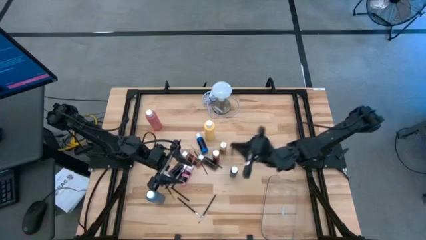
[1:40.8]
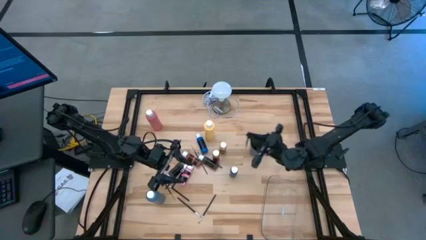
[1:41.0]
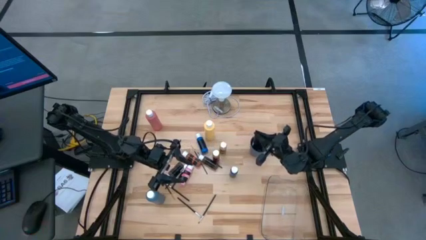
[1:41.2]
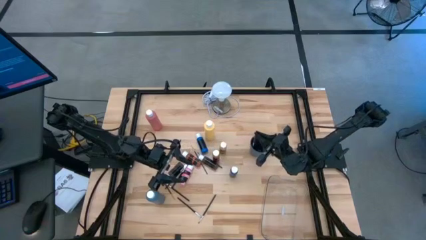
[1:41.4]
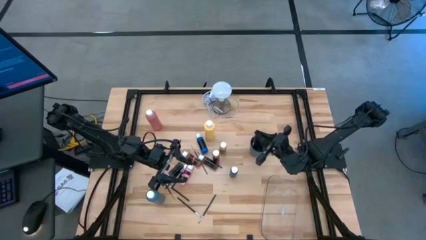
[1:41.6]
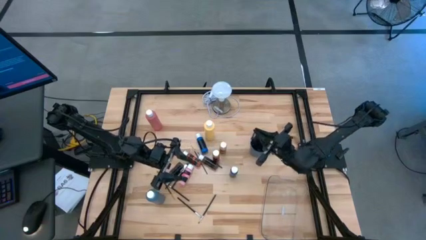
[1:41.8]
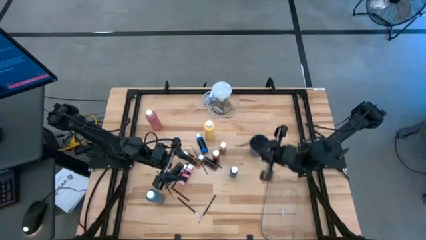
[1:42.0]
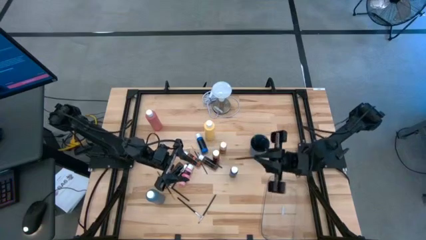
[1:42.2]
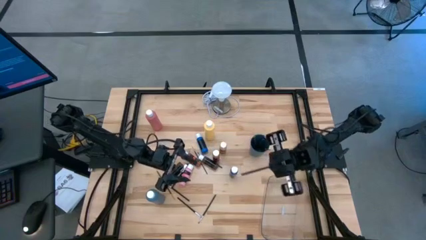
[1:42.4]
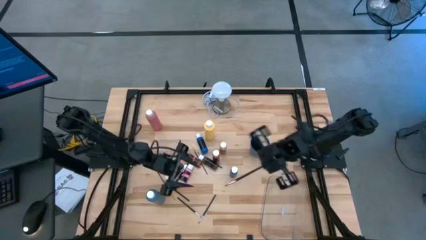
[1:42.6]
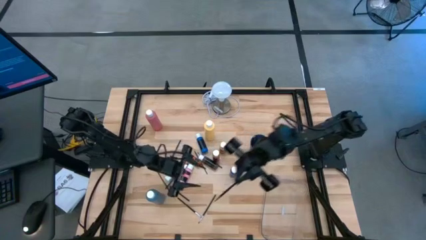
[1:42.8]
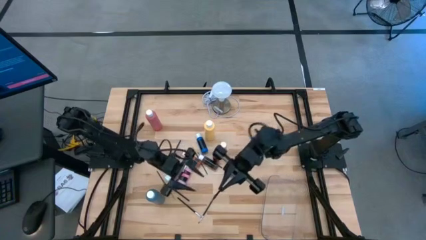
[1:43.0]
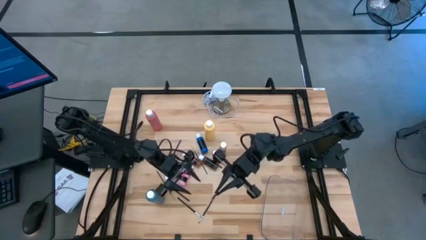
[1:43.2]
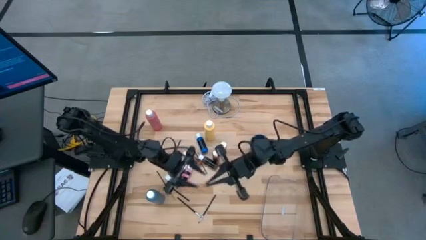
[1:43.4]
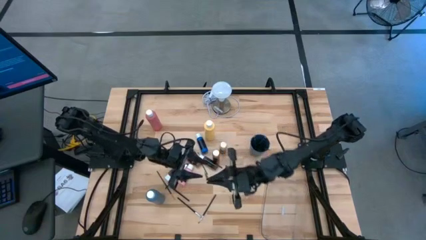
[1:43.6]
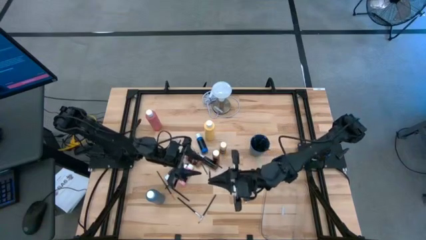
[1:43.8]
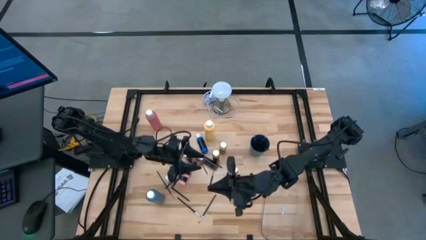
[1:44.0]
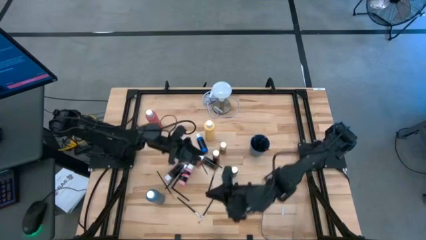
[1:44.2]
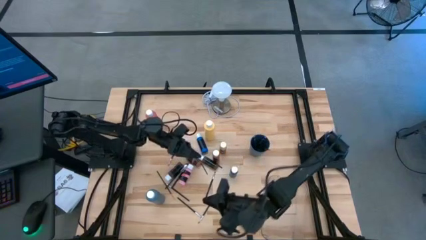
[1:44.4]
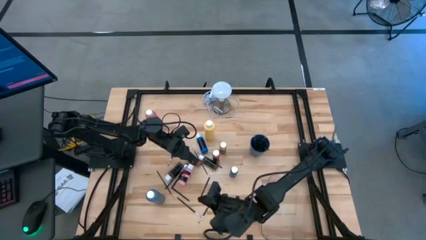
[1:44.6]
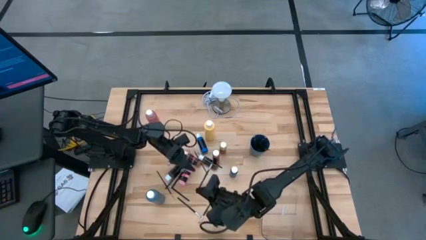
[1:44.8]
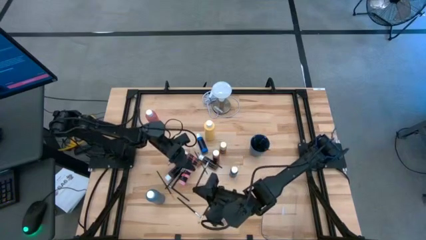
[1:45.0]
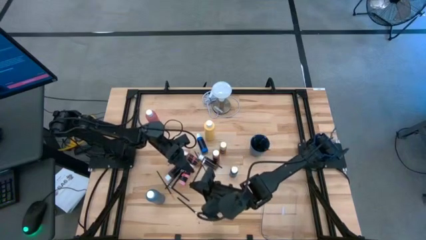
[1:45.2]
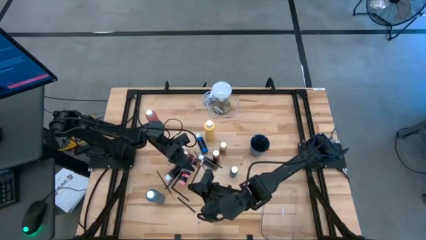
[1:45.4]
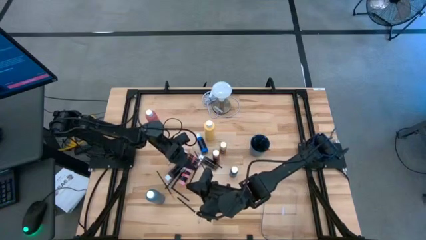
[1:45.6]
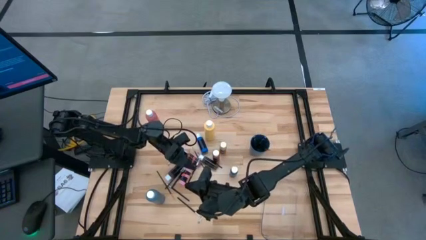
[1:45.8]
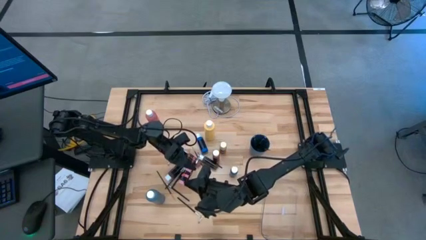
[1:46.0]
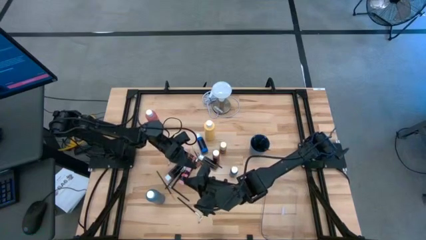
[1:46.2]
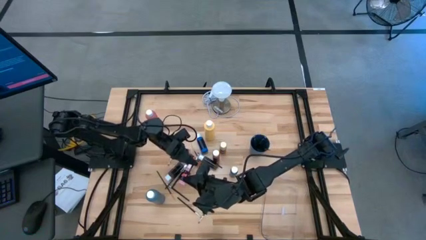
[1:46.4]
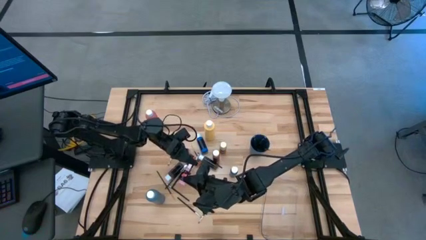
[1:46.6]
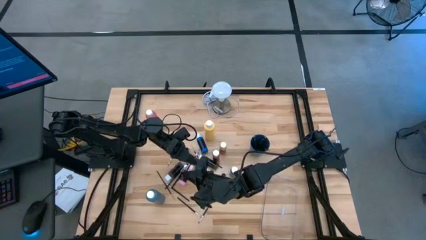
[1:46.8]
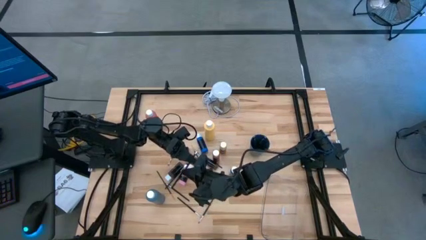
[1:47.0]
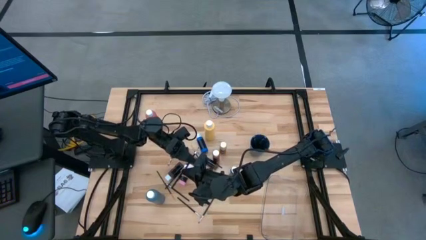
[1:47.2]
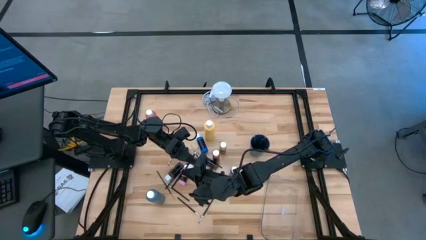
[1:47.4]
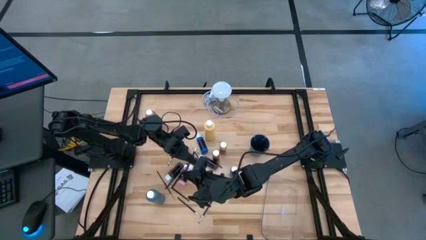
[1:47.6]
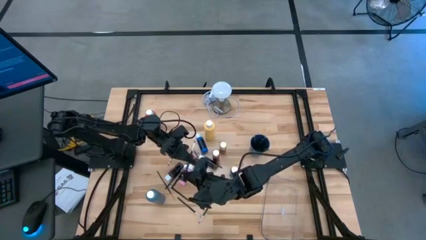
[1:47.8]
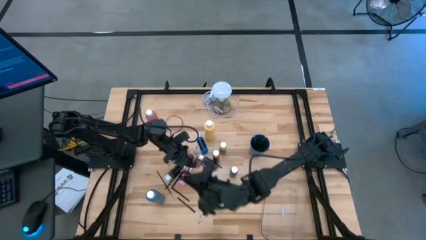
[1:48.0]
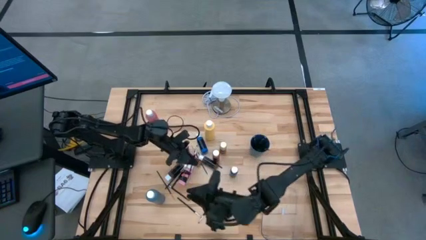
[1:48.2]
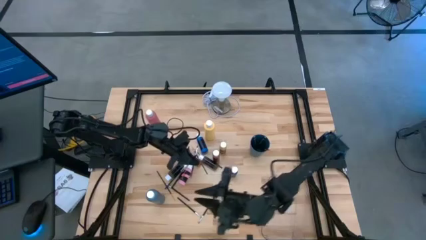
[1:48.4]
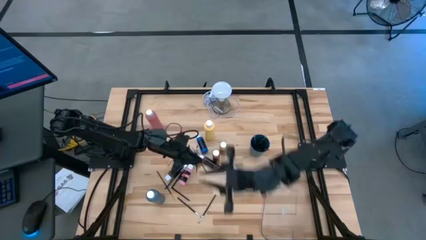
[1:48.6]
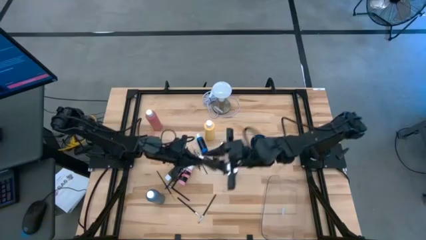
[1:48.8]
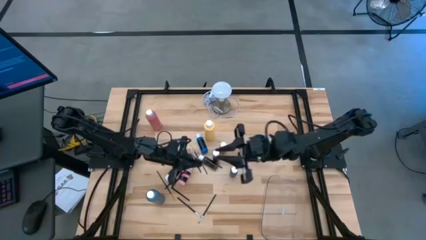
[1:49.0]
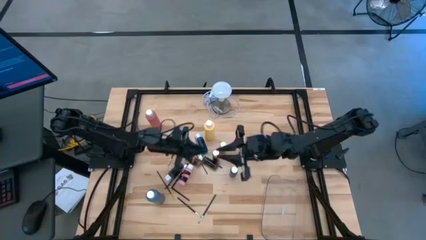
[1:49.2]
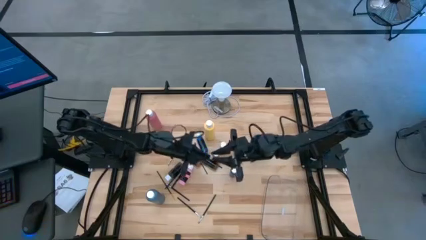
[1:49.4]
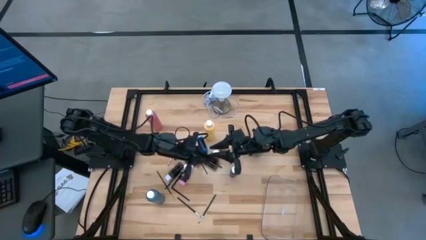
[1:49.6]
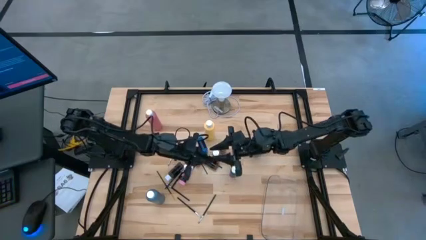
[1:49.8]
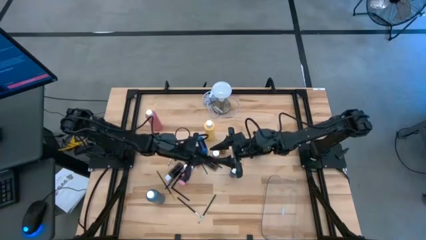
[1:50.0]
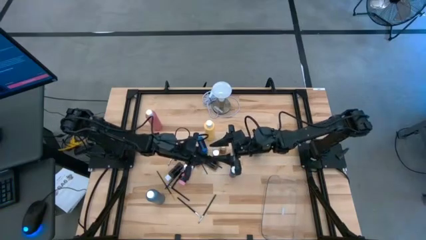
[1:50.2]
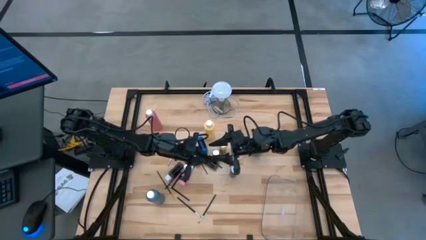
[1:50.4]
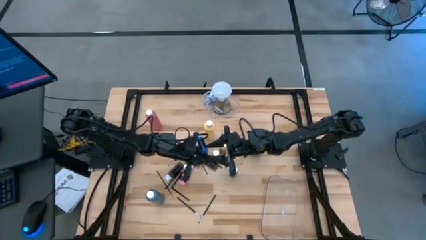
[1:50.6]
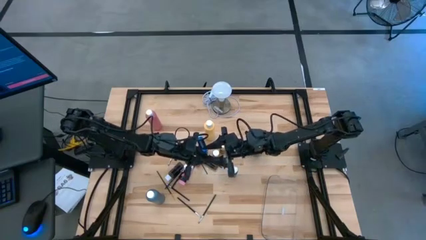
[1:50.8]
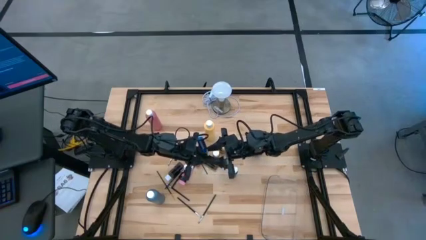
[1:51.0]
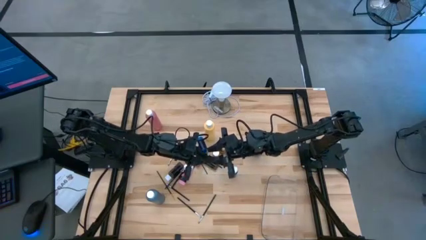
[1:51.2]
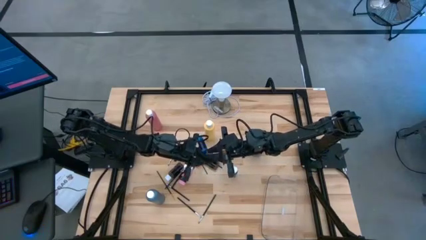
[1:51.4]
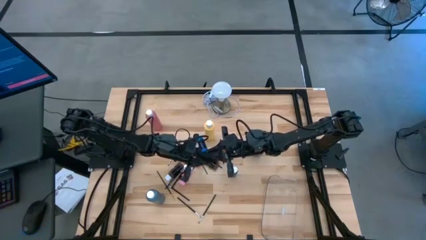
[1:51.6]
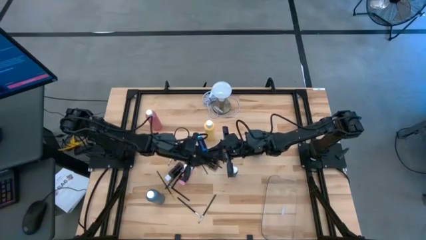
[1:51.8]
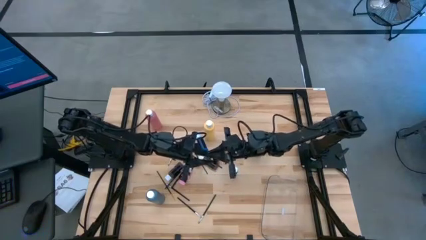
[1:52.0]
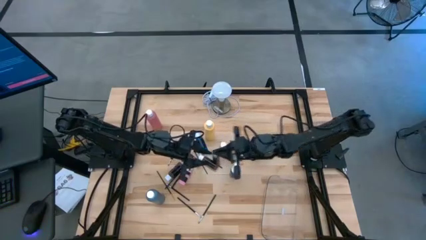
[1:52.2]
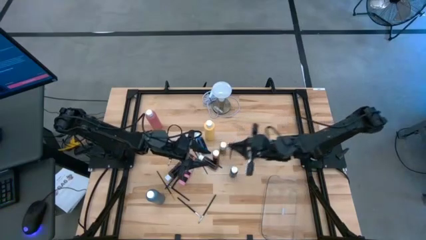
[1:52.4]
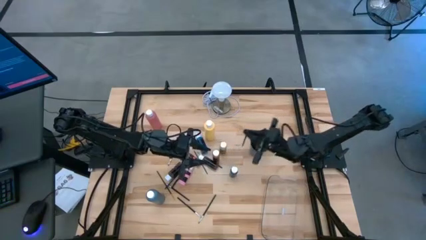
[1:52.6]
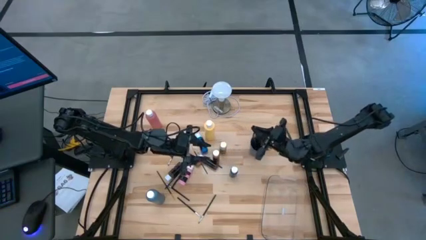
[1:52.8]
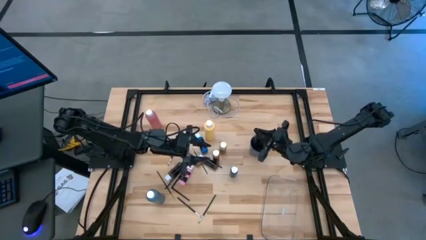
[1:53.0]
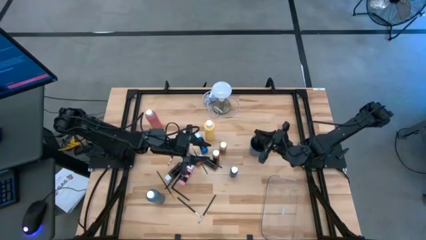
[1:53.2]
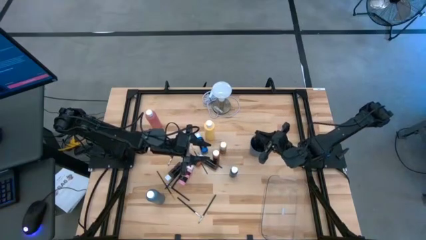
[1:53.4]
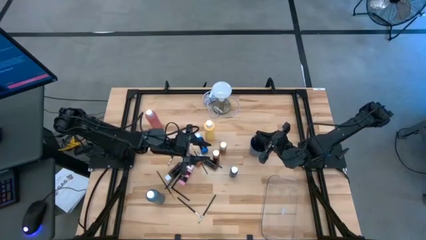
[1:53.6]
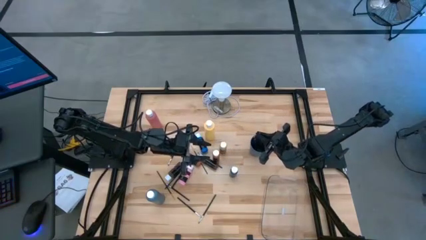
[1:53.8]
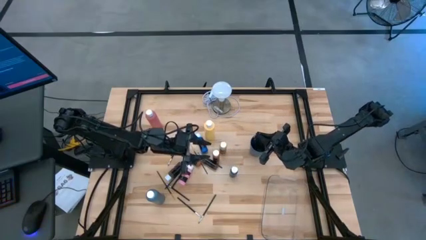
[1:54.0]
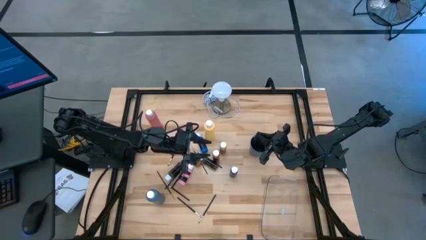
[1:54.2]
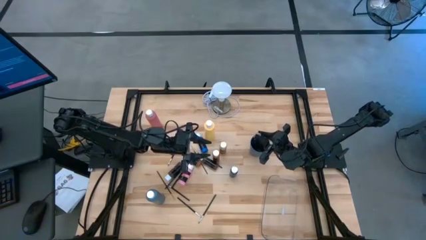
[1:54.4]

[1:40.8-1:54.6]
Task: Pick & Place Paint Supplies
Put the black silver paintbrush into the blue cup
